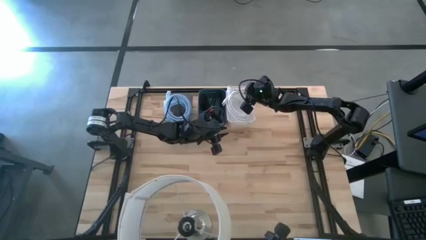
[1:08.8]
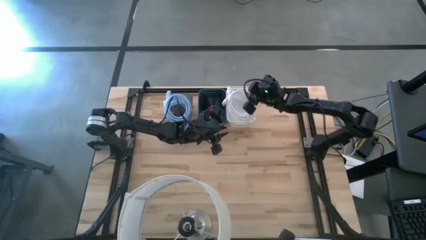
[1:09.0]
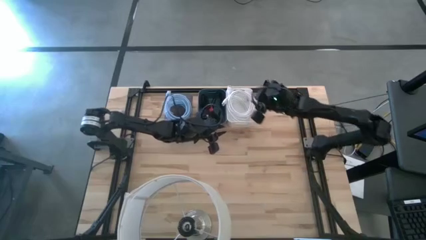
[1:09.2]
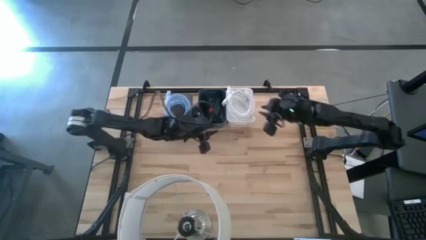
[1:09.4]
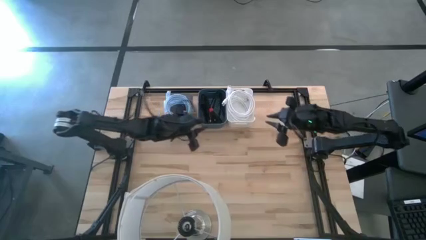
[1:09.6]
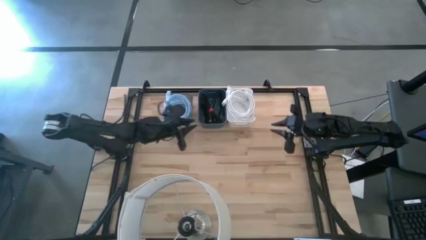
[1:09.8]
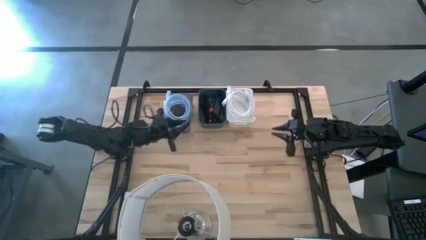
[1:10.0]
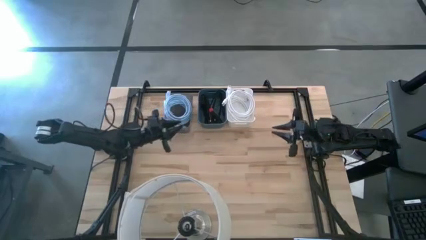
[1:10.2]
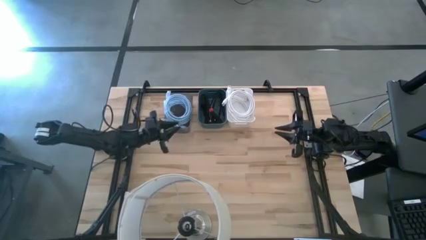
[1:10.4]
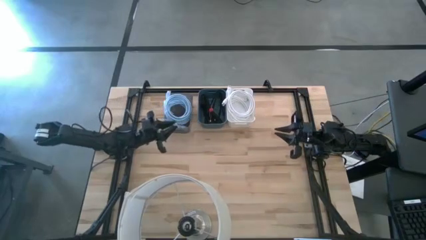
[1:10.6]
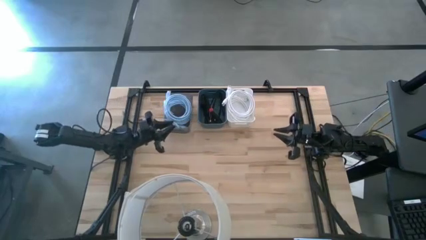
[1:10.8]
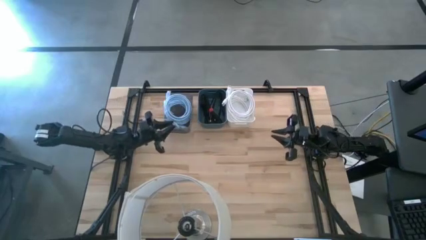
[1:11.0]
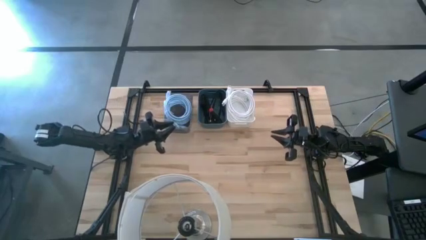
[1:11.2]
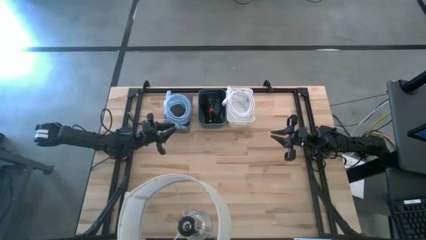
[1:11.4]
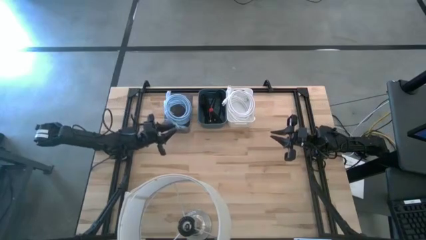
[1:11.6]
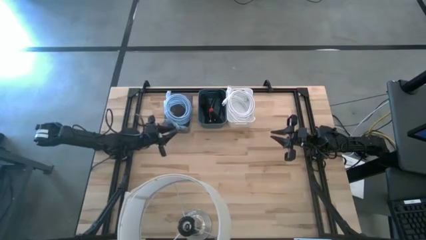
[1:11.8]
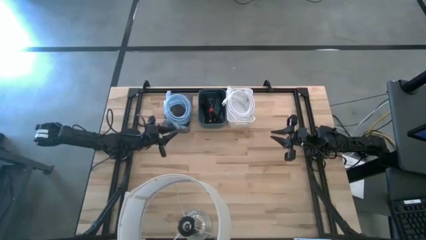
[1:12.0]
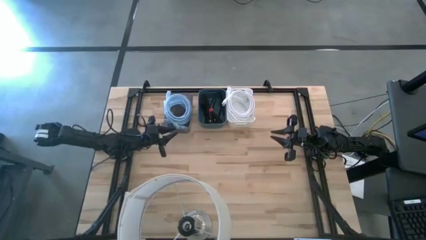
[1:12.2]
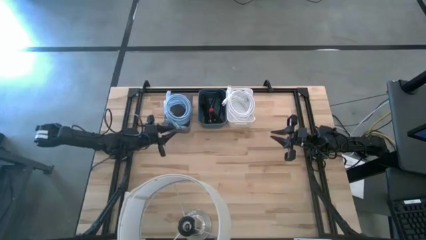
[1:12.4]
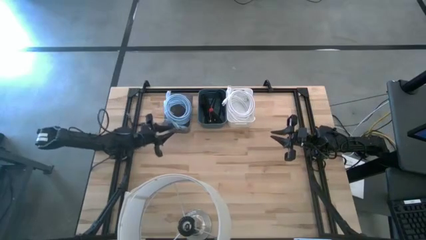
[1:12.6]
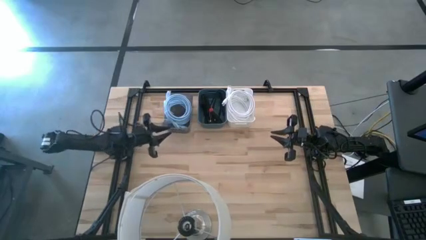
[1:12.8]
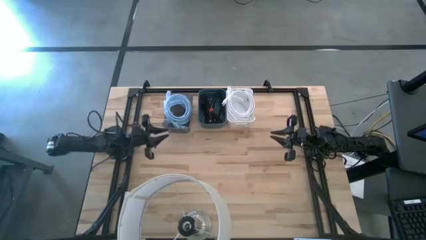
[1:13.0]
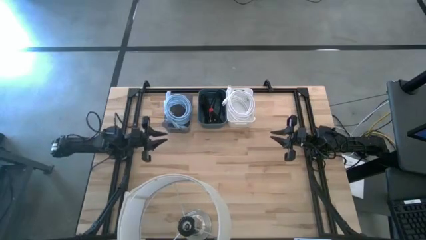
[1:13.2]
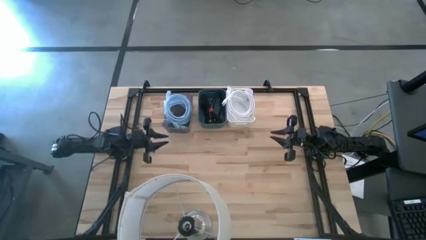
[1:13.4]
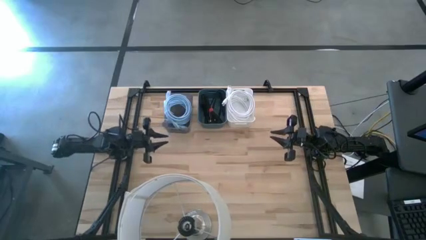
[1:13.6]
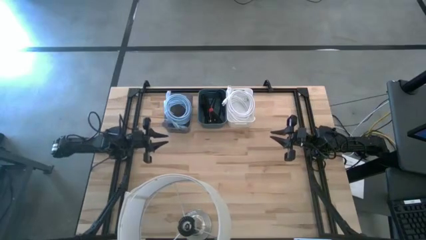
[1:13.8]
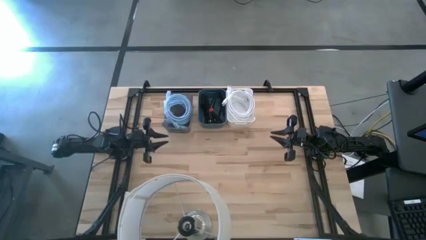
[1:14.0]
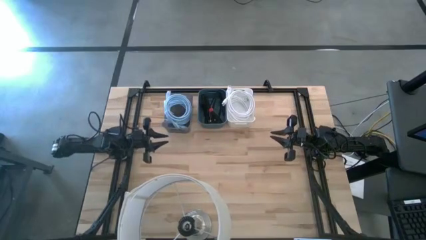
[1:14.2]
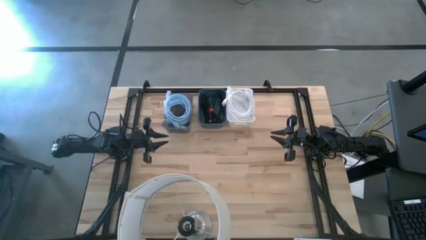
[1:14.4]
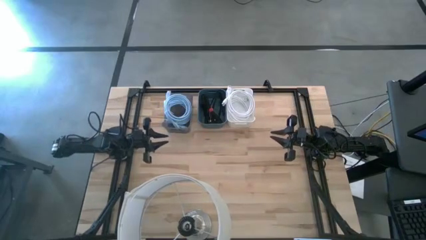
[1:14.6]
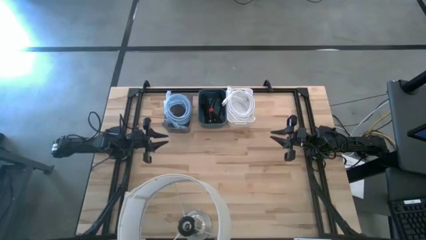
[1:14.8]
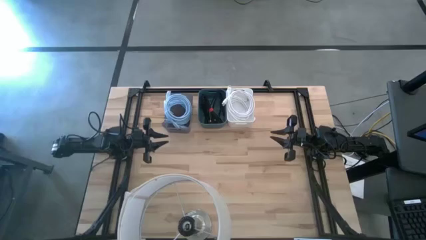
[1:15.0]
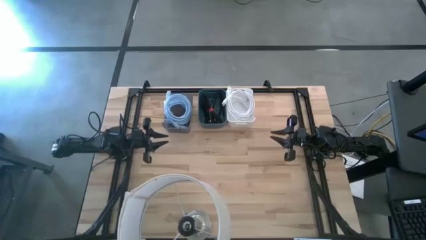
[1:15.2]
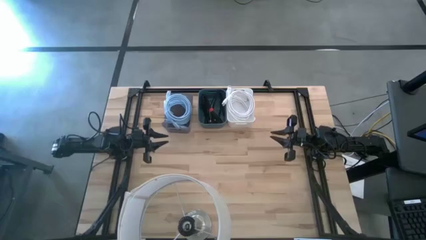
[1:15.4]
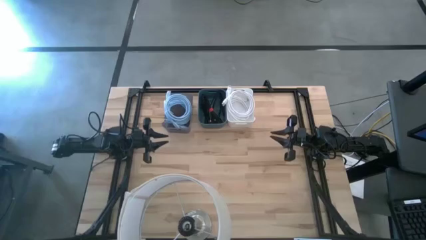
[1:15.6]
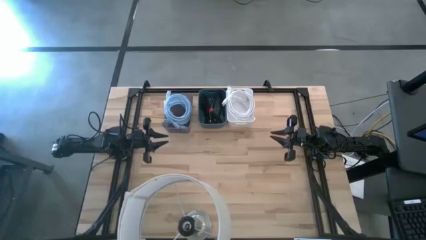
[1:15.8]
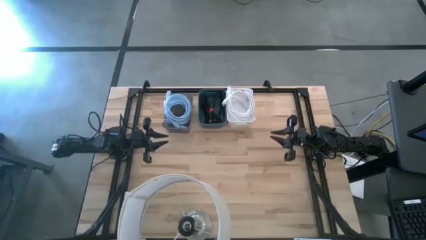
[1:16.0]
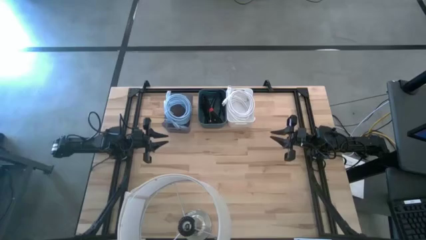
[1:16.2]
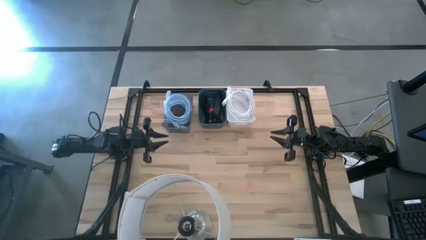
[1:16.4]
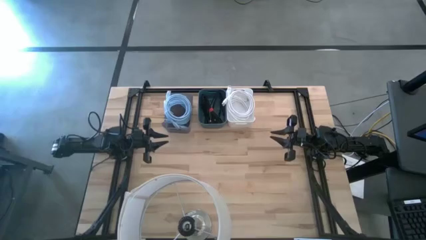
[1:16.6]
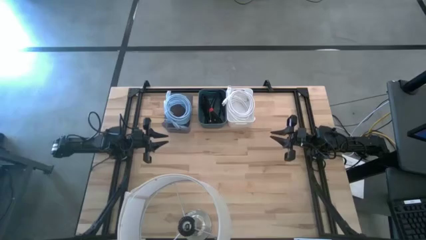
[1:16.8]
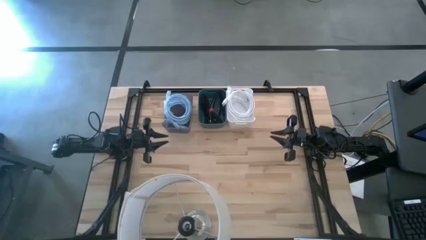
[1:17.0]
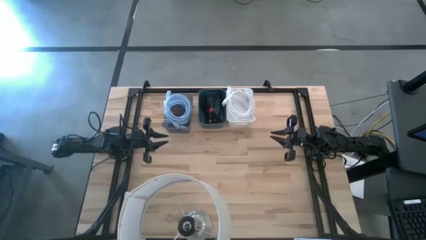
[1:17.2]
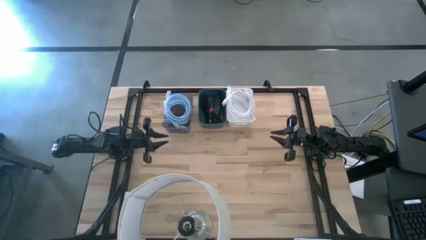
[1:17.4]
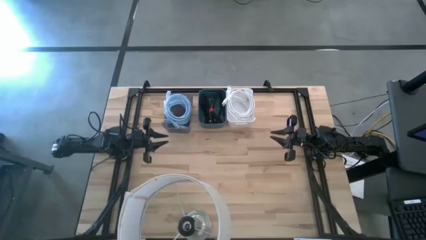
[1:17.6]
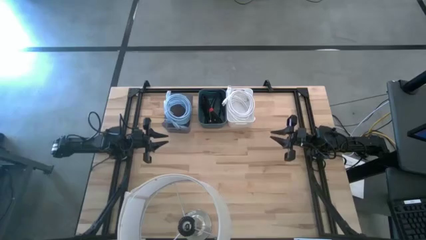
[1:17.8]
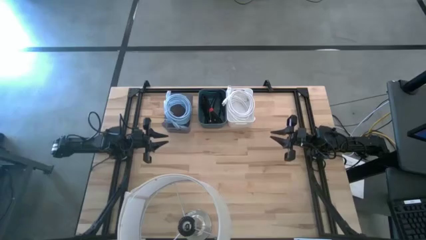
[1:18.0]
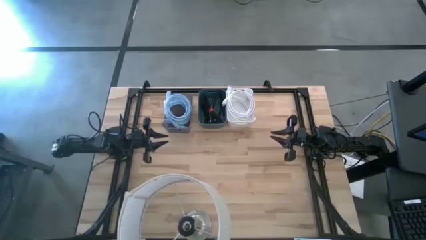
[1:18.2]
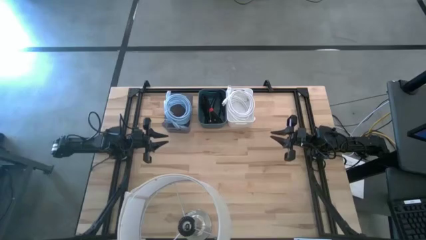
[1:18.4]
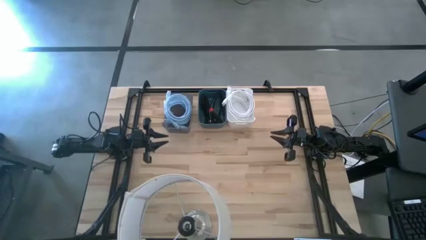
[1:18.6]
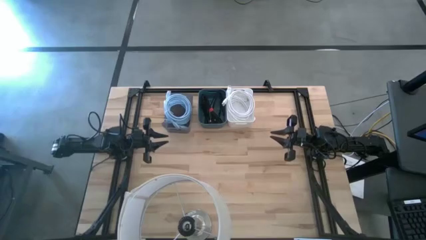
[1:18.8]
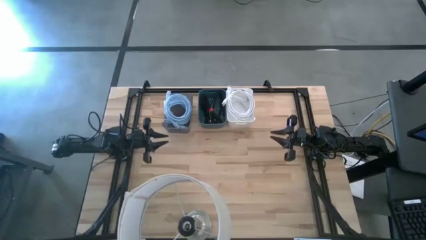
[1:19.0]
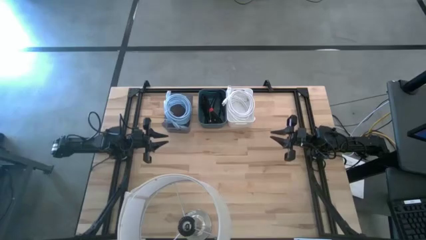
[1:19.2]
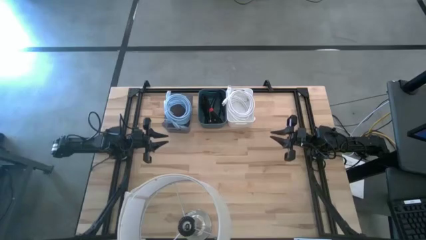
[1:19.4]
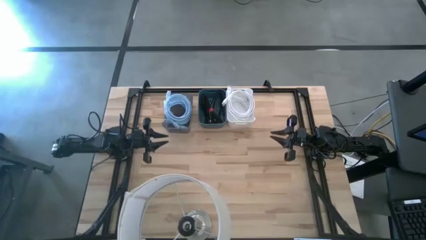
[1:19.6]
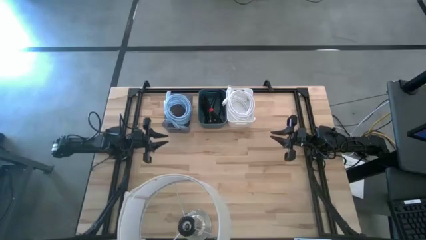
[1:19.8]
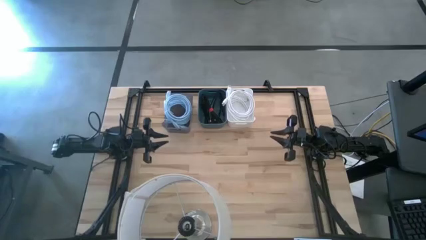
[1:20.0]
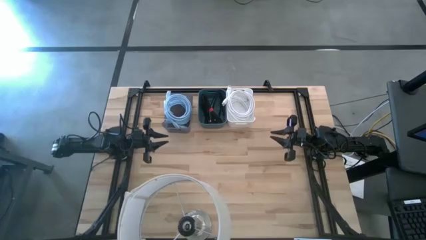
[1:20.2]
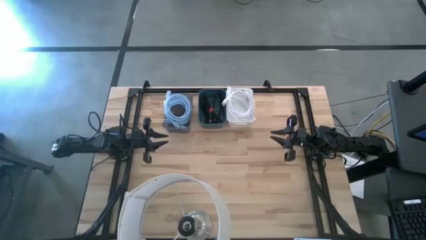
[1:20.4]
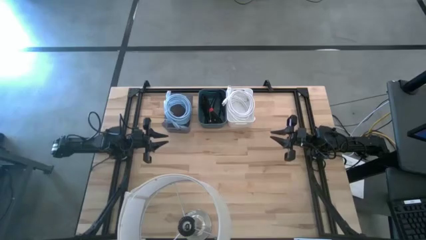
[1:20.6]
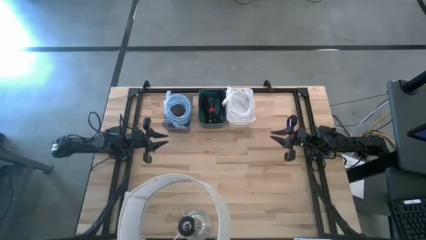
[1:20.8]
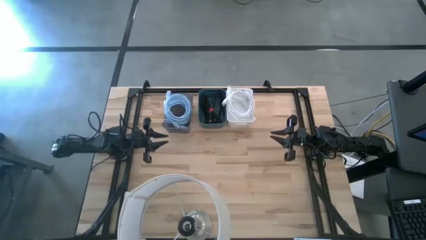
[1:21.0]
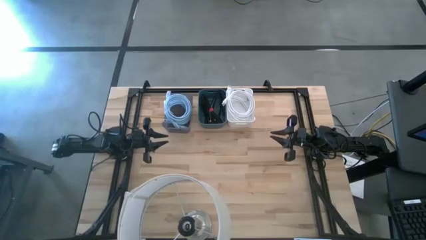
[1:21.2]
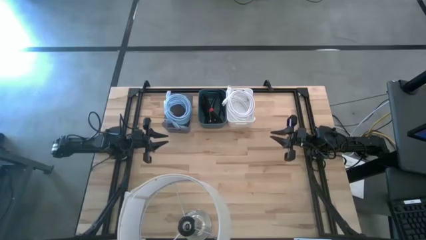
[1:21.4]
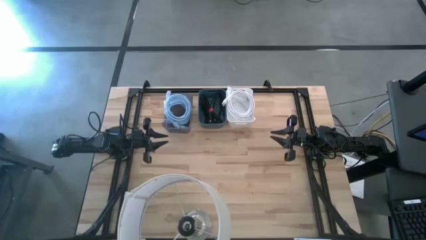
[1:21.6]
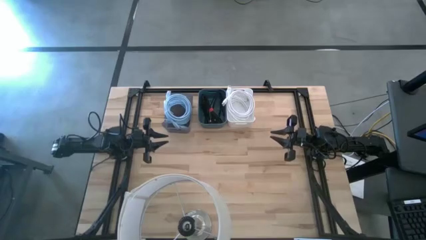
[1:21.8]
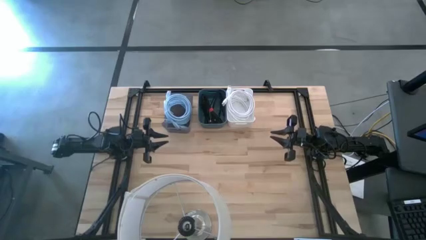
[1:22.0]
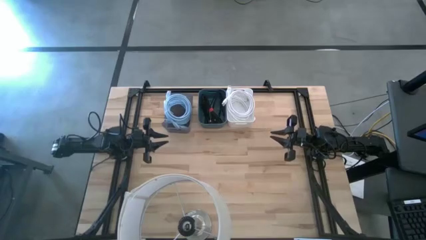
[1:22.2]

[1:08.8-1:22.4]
Task: Sort HDMI cables
Return to Home Position

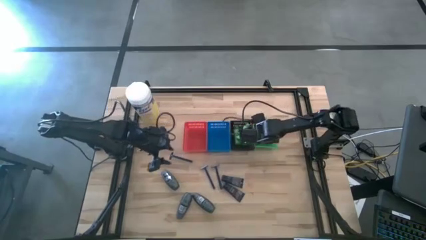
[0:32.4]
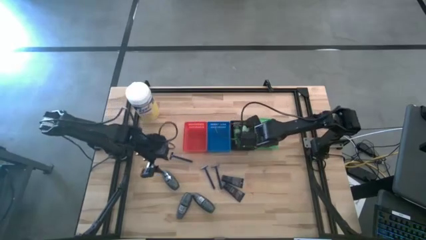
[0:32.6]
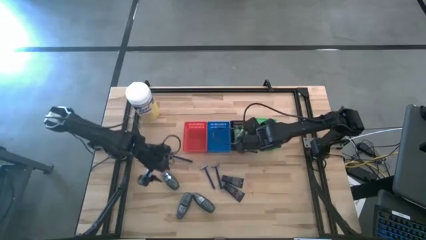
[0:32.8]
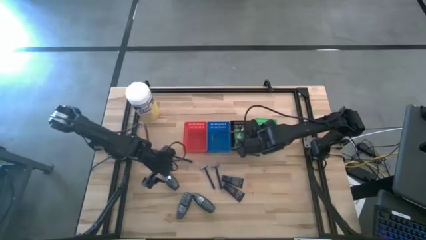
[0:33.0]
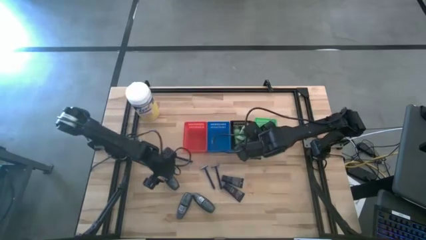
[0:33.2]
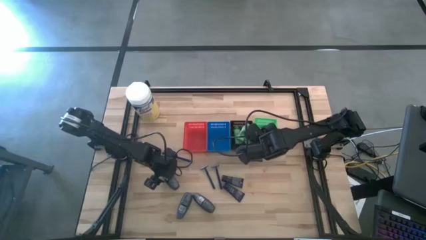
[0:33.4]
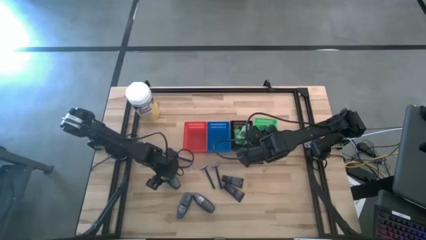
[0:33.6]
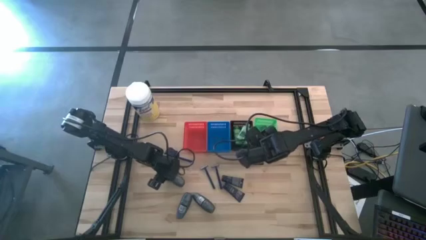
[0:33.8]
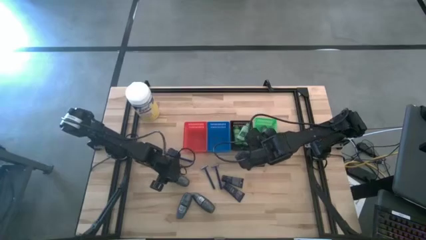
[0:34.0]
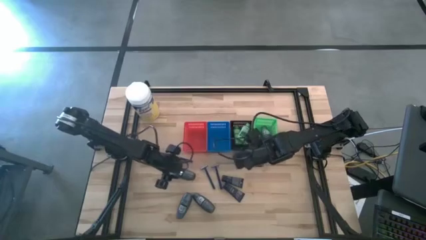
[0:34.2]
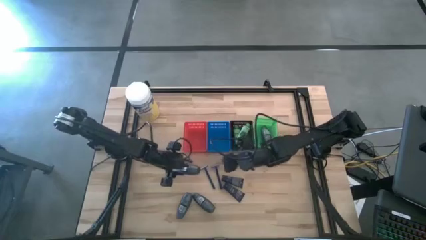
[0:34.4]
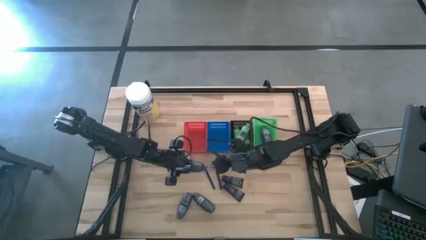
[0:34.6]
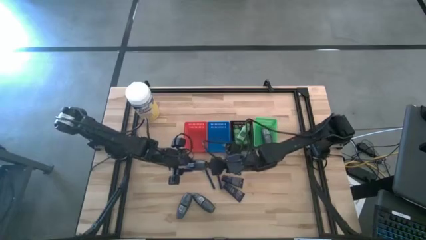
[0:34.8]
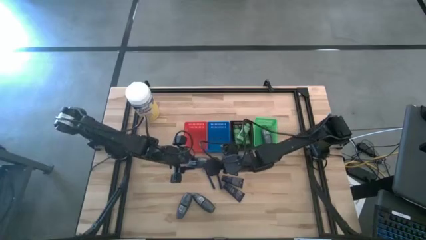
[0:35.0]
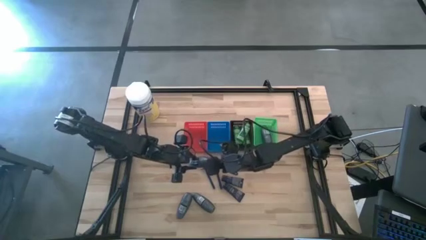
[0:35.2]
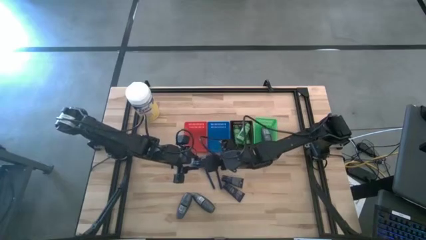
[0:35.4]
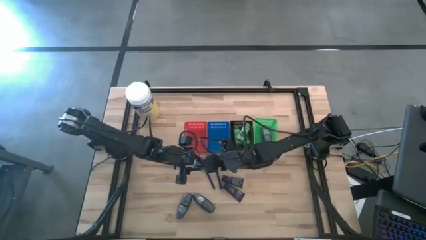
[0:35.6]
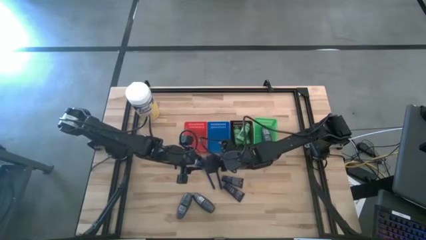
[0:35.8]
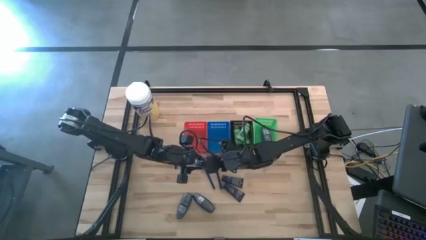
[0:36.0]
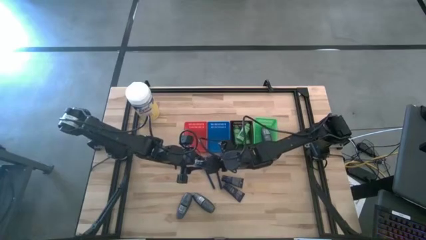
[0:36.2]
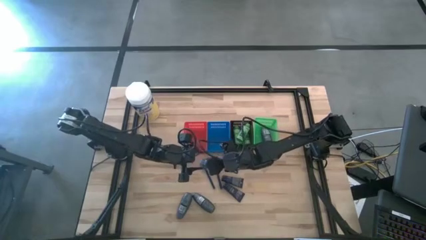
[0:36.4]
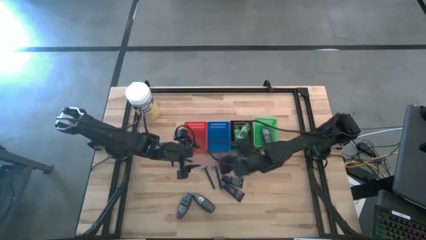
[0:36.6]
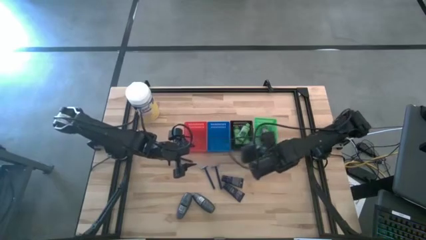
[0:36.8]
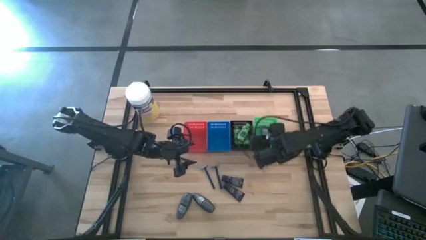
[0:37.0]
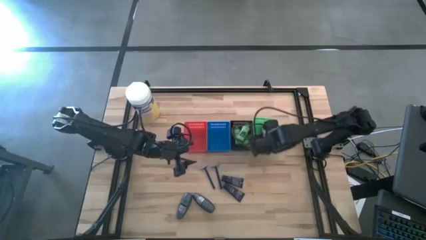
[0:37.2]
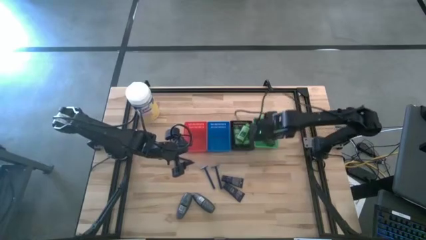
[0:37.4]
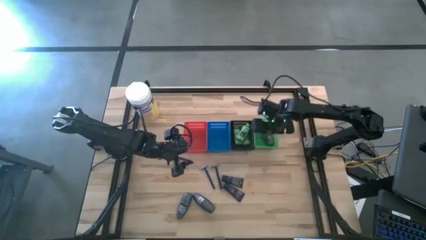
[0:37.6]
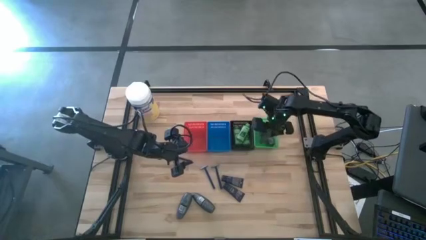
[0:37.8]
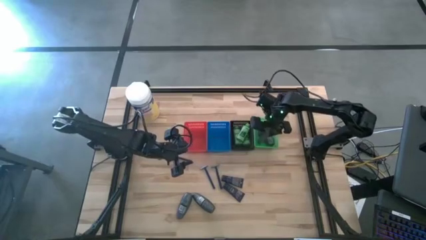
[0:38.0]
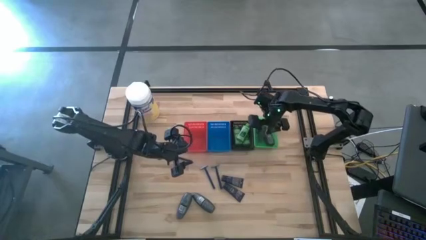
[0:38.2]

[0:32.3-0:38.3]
Task: Pick & Place Travel size toiletries
Put the deodorant into the green basket
